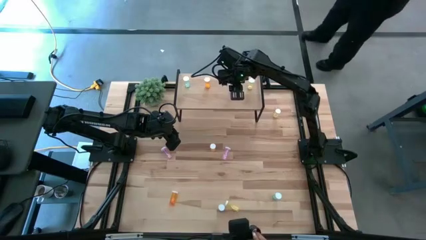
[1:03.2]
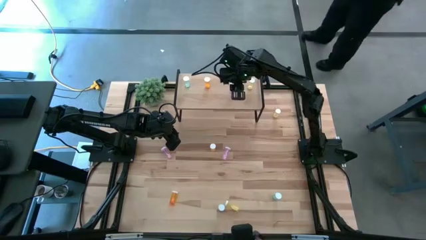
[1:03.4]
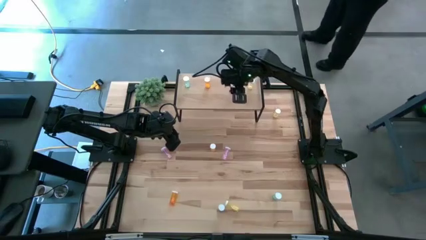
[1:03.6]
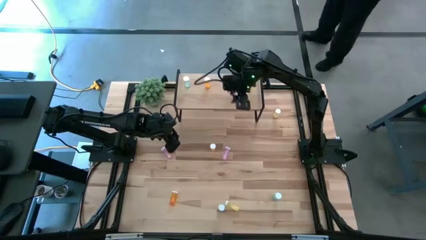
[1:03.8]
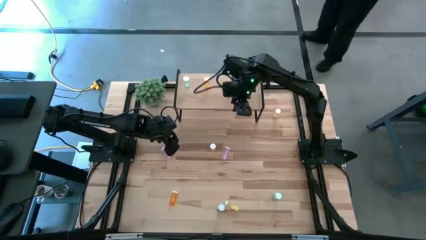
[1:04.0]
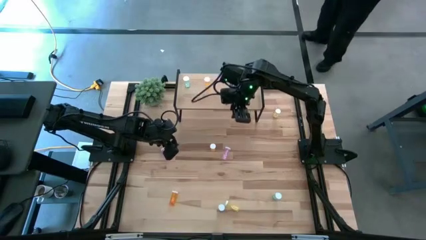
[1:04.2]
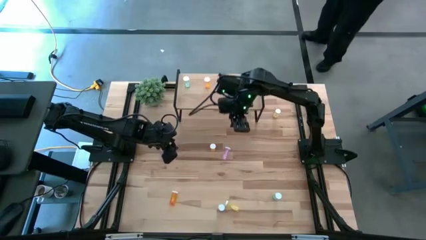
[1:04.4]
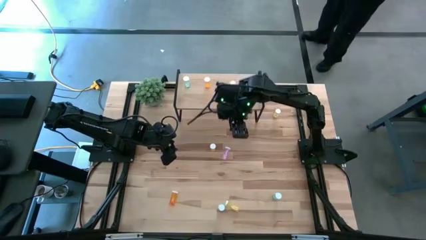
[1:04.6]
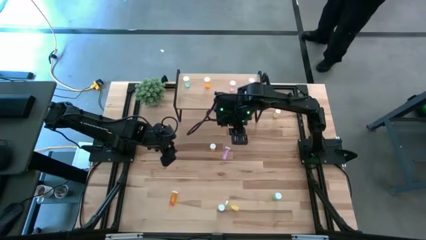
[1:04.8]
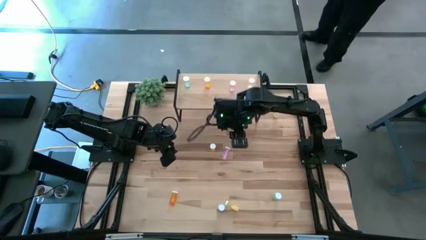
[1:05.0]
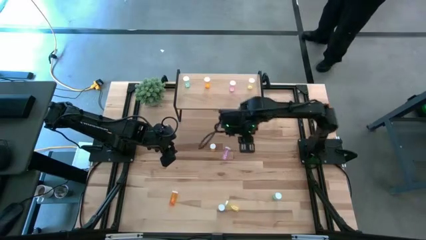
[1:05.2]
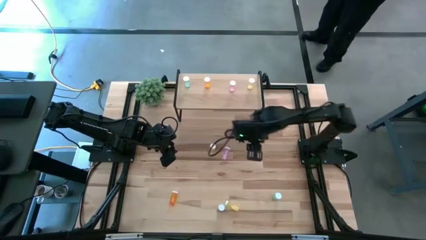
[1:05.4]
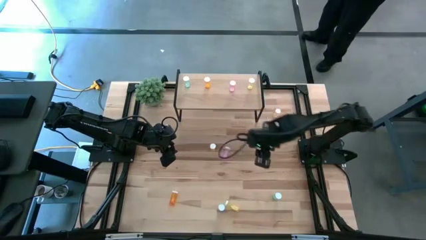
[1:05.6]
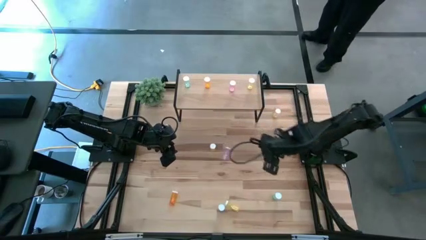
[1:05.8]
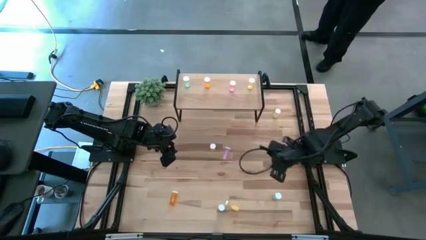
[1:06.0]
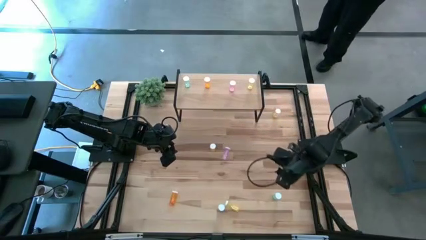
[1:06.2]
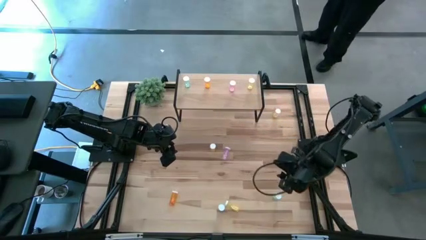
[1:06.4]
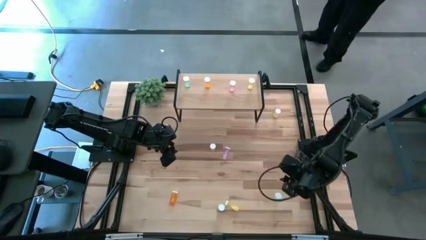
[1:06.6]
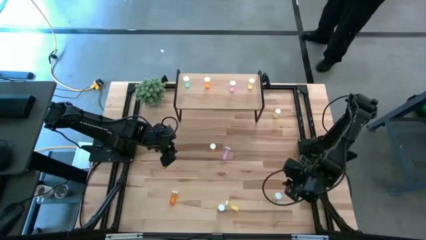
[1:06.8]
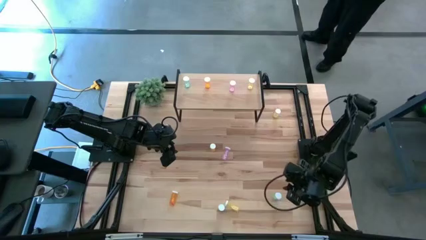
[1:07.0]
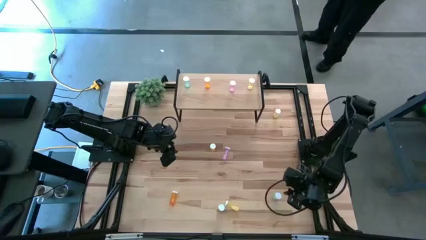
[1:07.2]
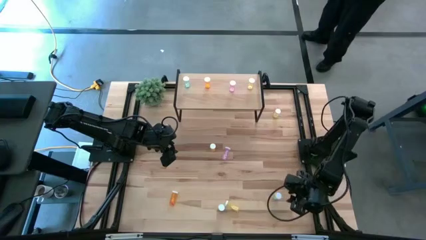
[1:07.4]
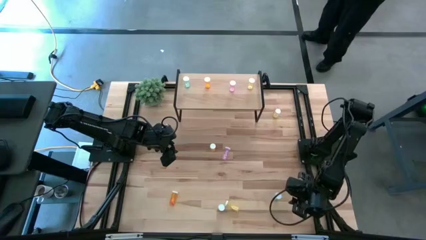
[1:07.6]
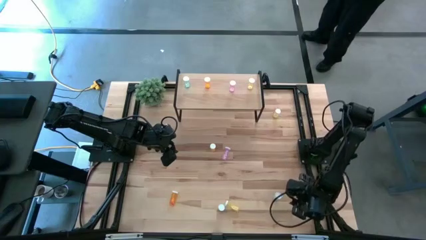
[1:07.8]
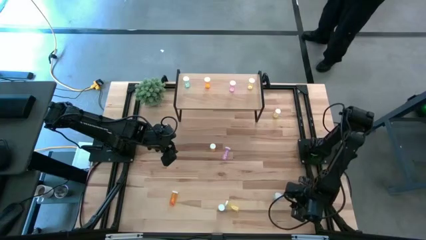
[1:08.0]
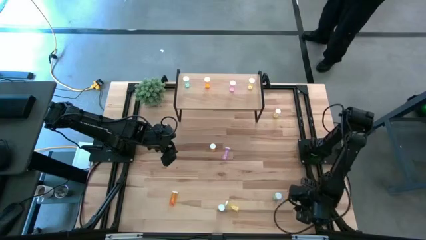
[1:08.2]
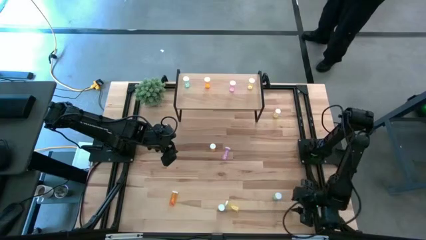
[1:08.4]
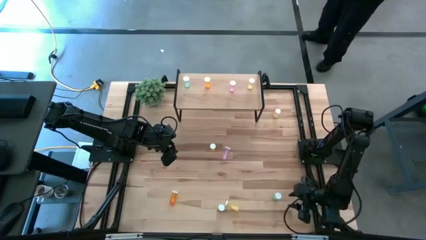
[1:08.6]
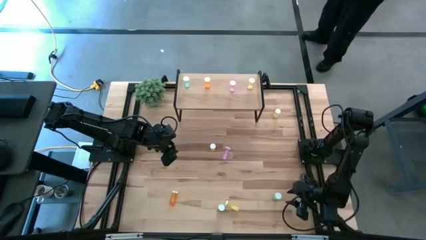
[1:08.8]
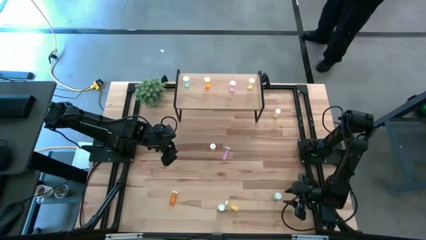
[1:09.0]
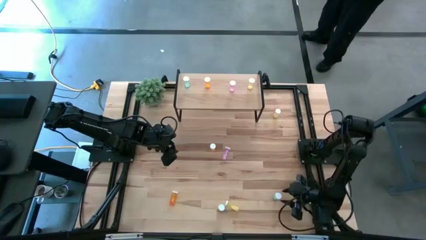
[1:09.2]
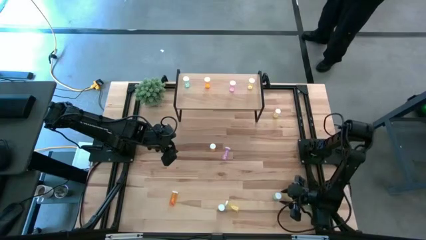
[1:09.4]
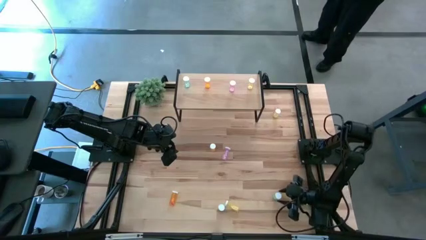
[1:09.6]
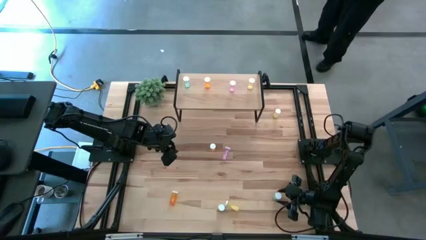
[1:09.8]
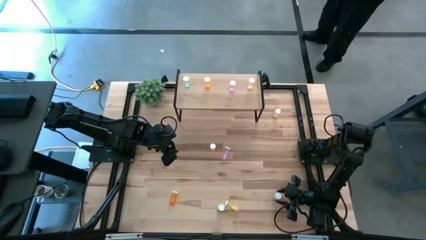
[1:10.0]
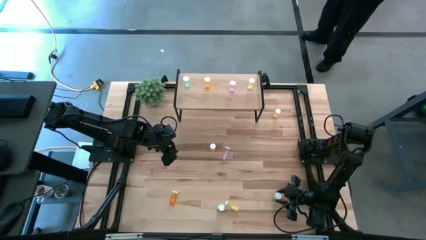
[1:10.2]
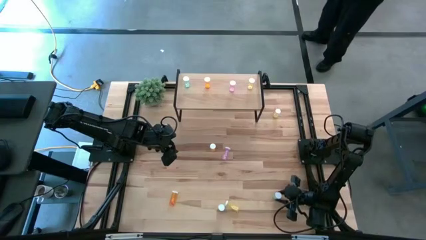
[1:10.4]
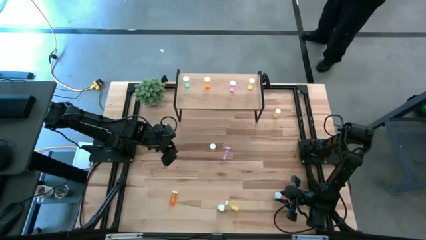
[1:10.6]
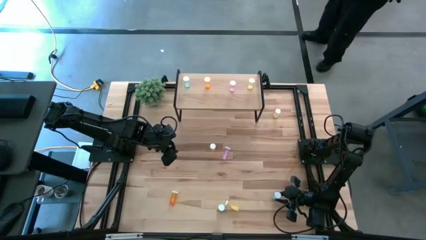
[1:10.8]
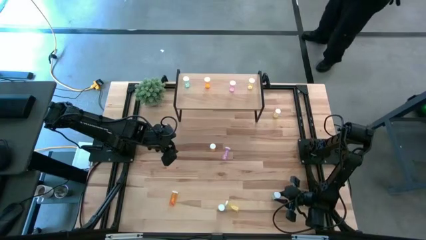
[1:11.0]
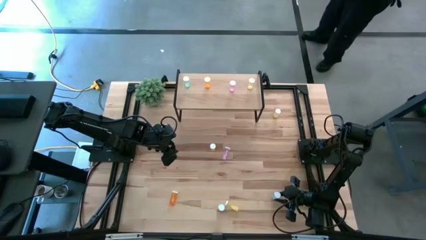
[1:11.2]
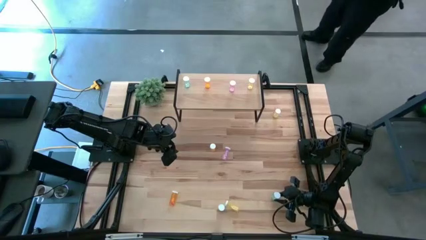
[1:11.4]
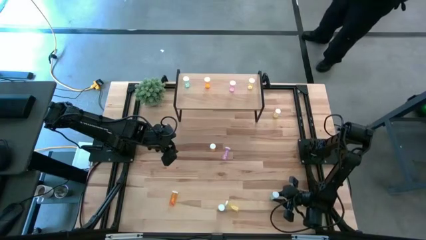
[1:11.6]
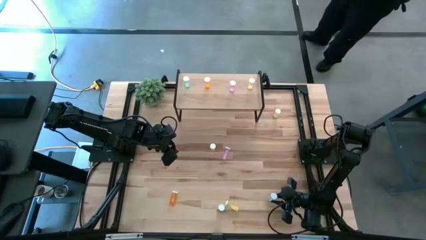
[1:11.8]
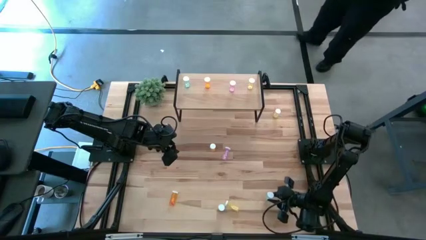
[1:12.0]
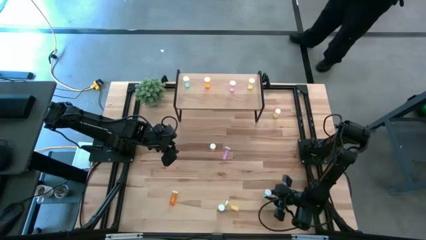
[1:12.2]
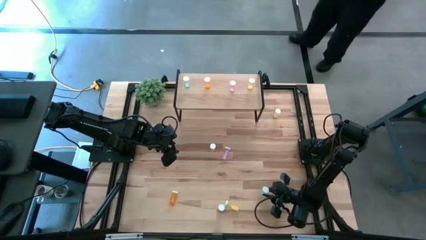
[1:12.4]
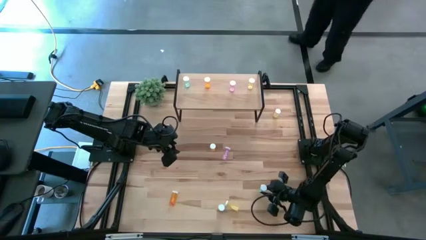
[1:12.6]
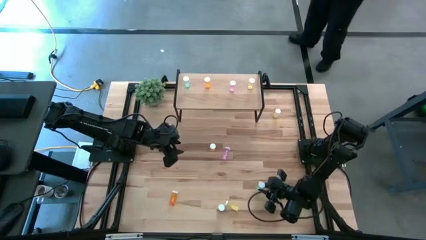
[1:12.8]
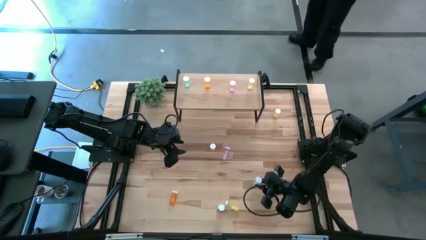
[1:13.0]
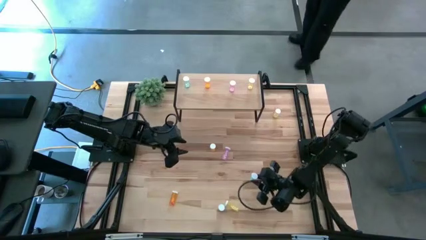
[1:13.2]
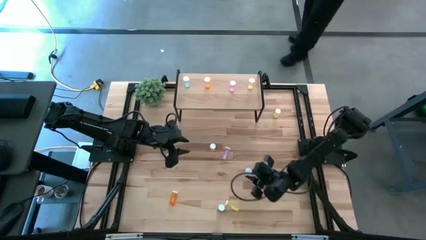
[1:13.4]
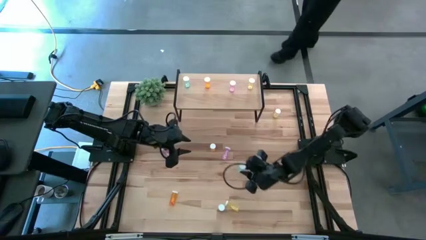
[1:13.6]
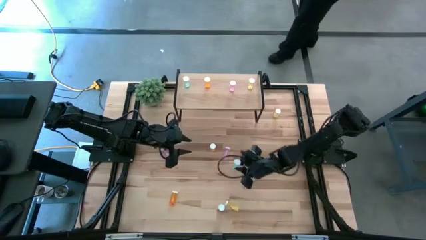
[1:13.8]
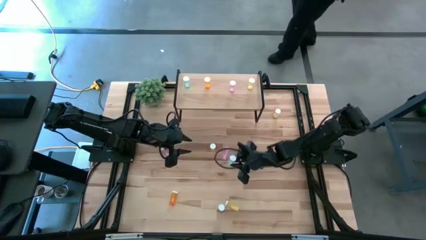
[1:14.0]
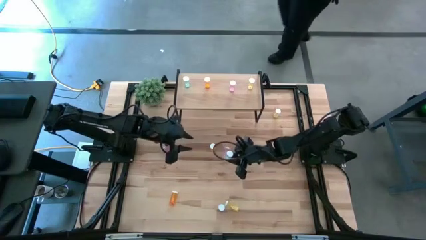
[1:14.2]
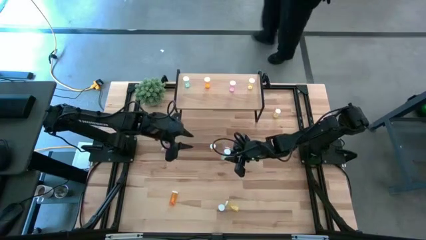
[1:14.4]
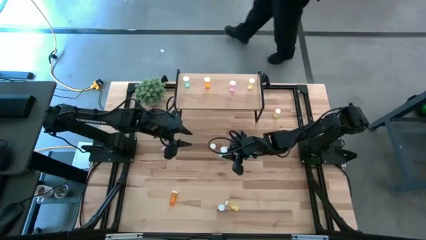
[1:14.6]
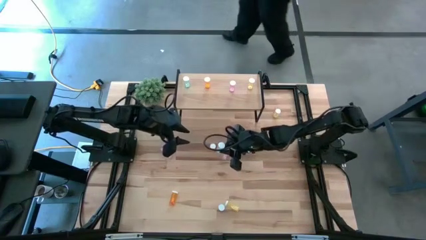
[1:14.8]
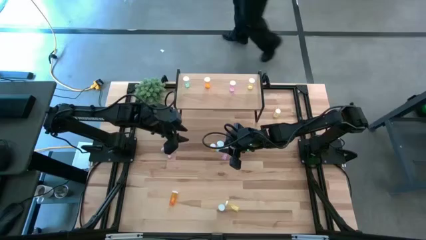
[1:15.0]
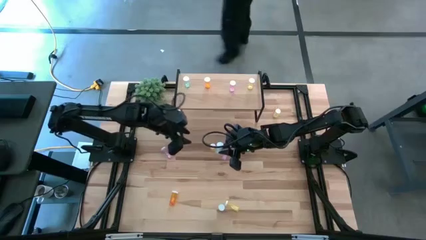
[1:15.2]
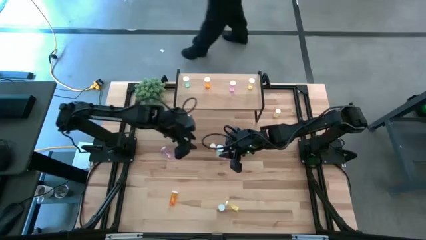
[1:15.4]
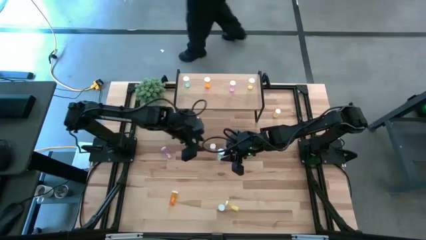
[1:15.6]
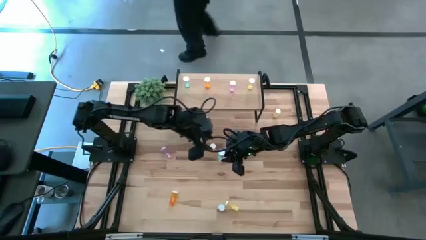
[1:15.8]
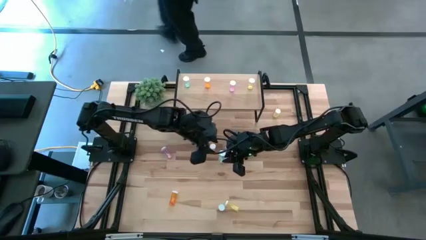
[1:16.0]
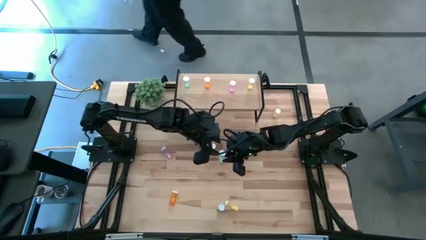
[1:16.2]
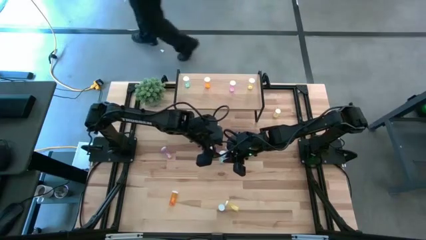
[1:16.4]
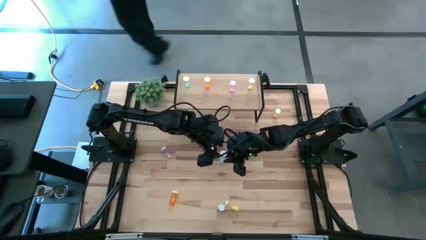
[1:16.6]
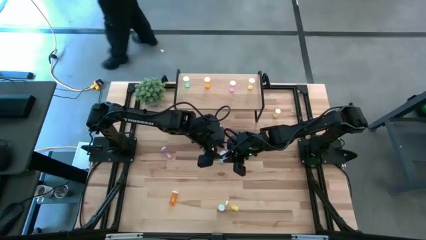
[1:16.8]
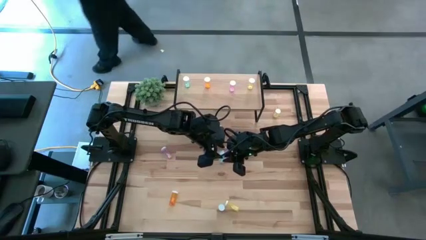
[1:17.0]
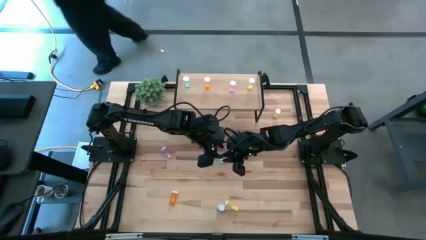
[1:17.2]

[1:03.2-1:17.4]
Task: Pick and place medicine bottles onto shelf by color
Put the right blue pill bottle on the shelf aligned with the blue pill bottle

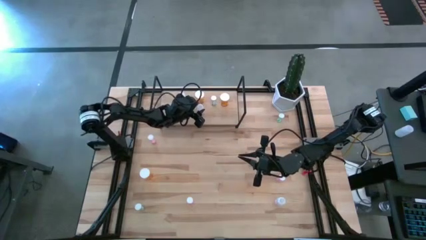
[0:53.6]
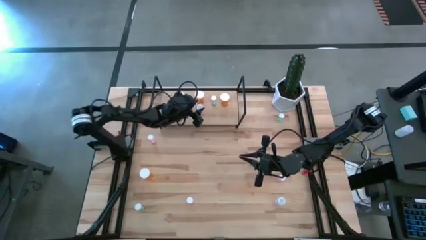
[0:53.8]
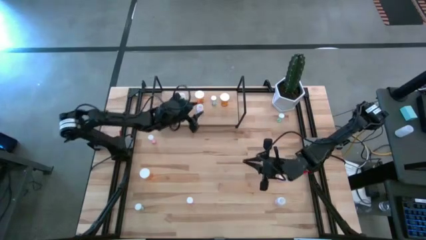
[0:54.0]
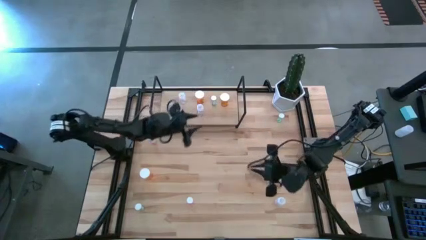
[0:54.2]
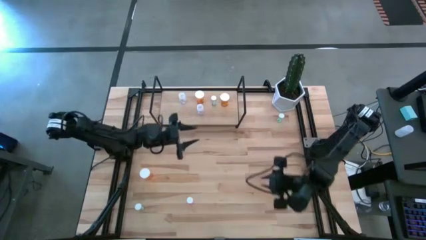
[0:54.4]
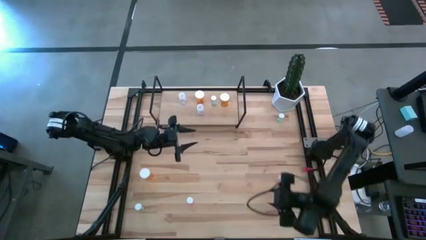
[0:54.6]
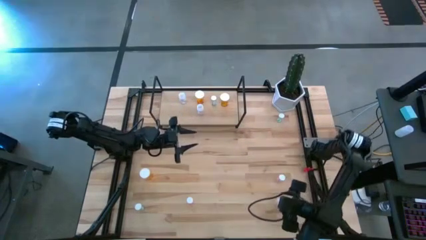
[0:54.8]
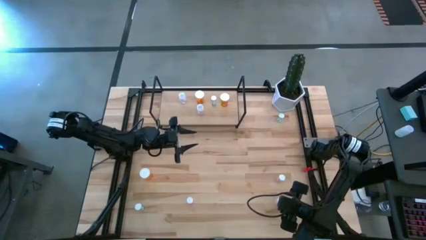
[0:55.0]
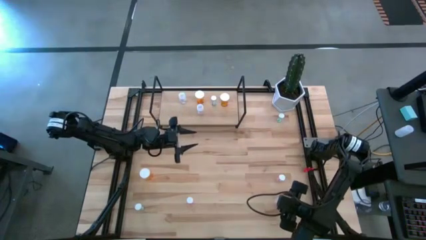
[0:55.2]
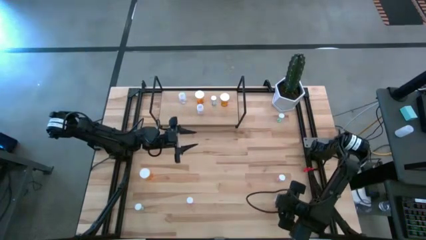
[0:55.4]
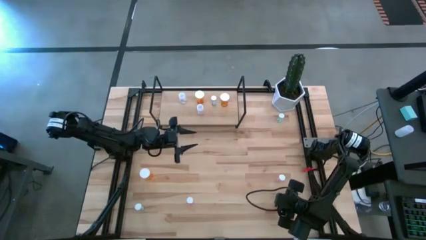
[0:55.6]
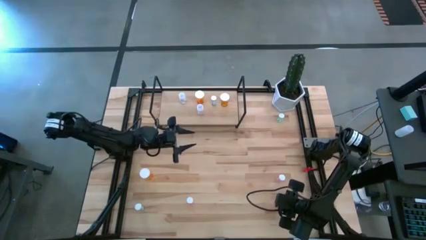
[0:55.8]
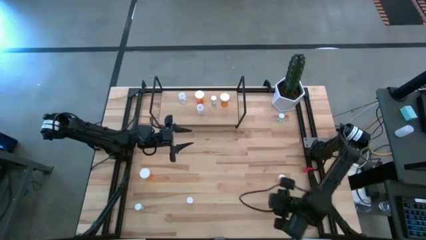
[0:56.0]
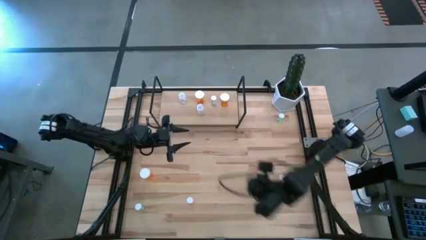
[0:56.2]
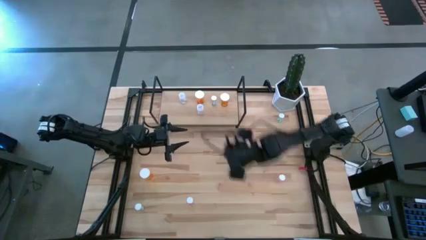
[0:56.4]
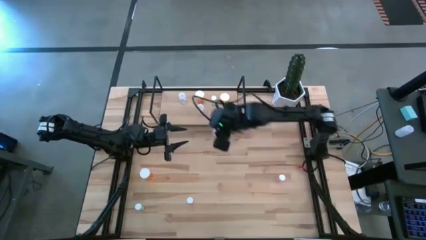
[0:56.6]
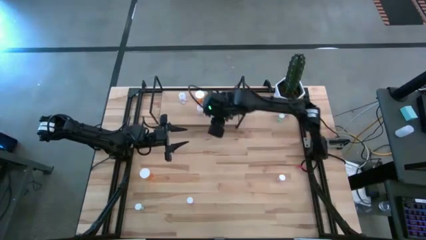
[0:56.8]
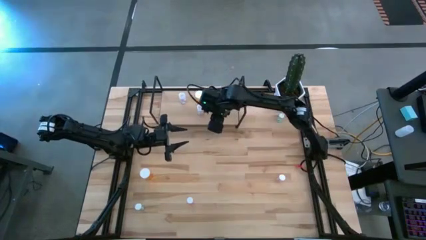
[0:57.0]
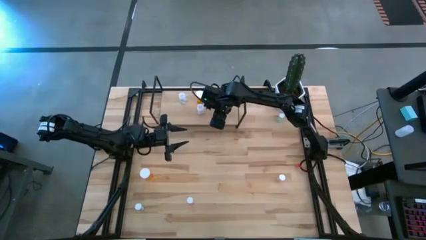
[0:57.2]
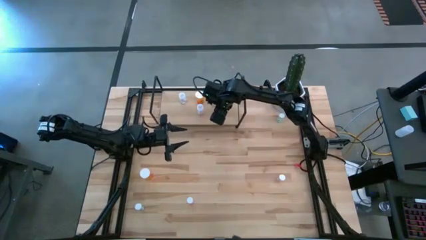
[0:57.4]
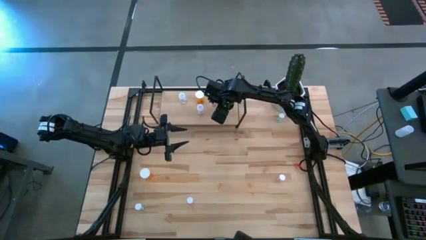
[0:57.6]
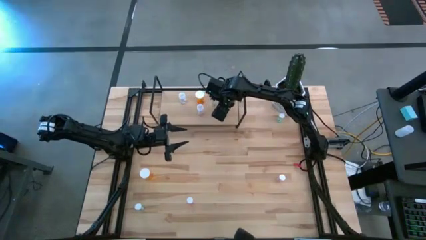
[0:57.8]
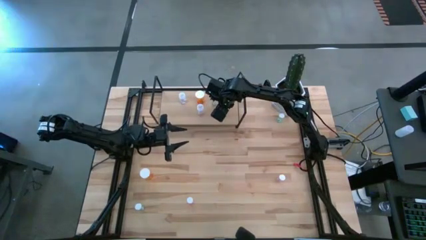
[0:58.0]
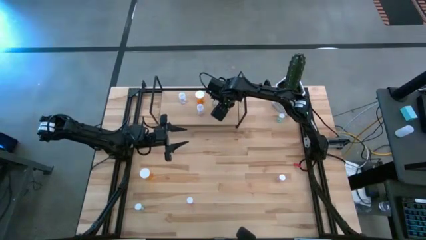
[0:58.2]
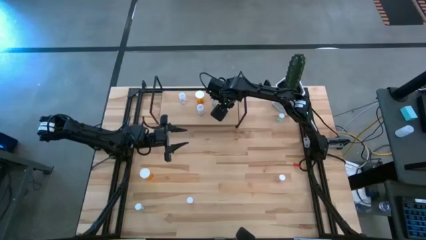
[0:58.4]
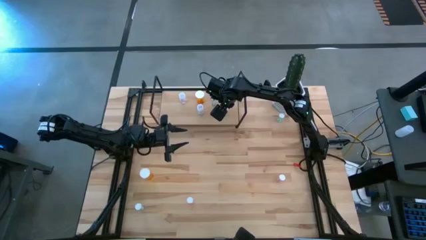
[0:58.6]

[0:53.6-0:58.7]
Task: Pick and place medicine bottles onto shelf by color
Put the transparent pill bottle on the shelf
